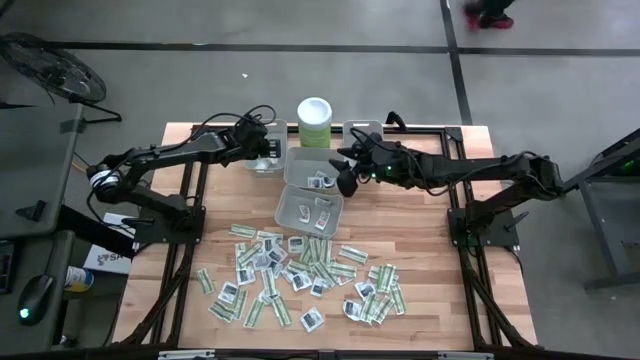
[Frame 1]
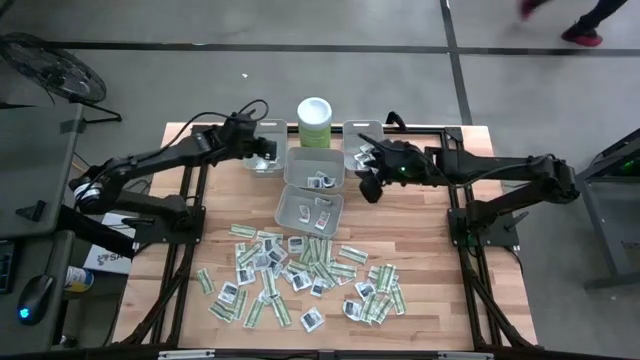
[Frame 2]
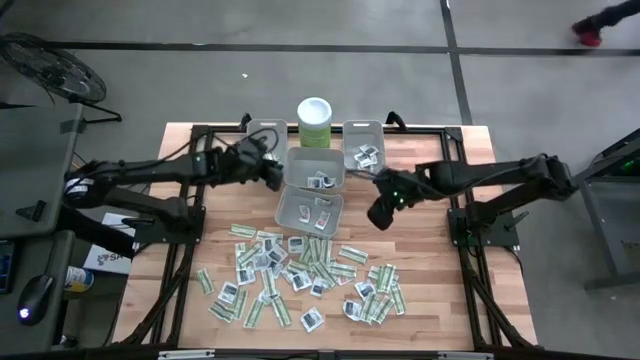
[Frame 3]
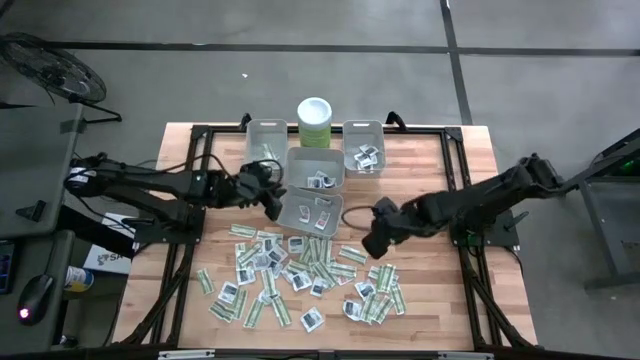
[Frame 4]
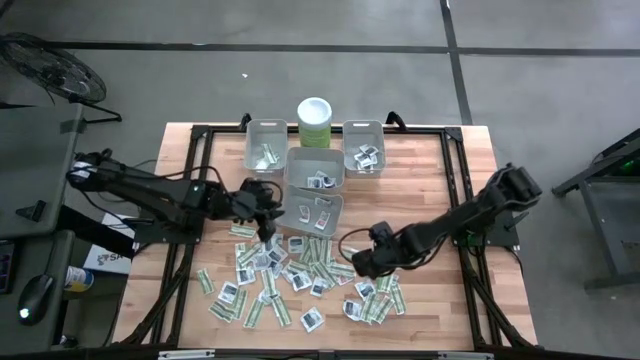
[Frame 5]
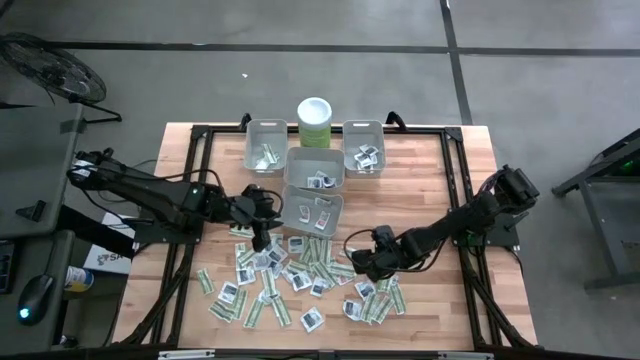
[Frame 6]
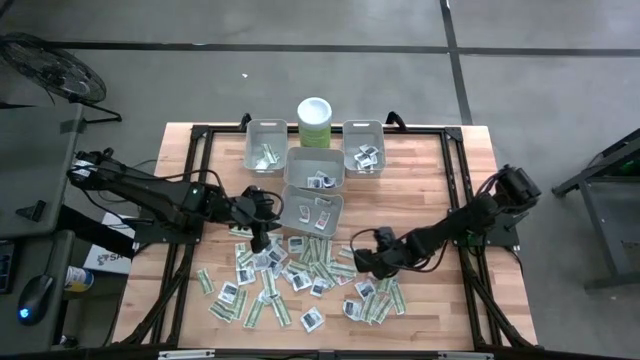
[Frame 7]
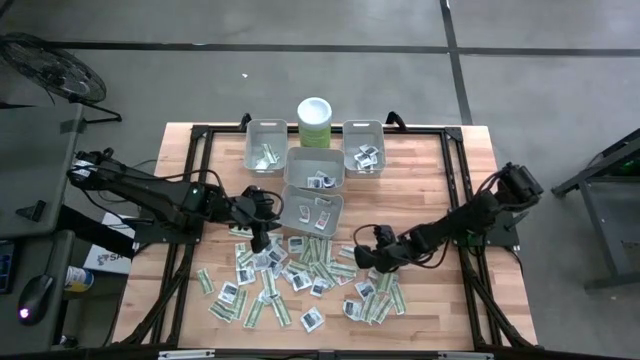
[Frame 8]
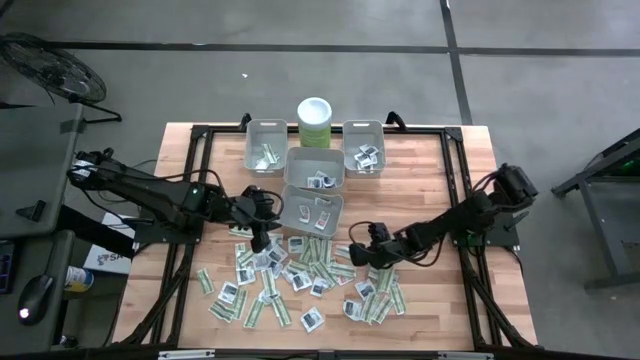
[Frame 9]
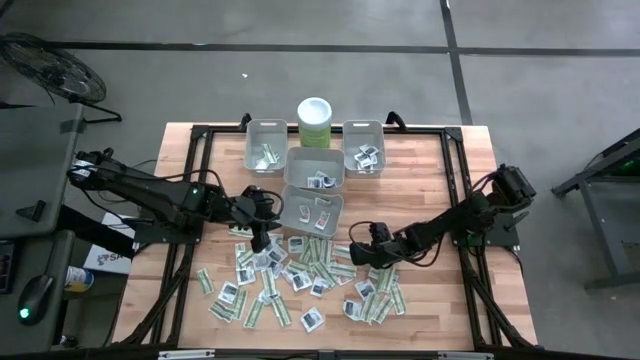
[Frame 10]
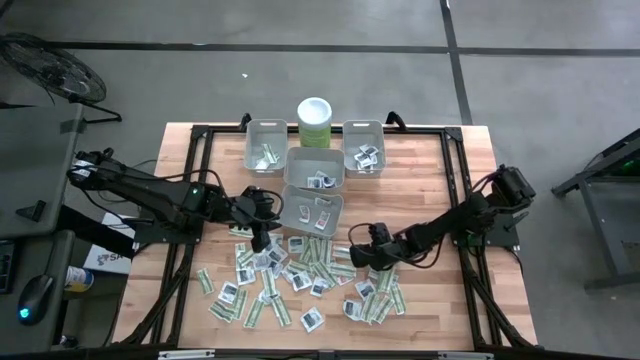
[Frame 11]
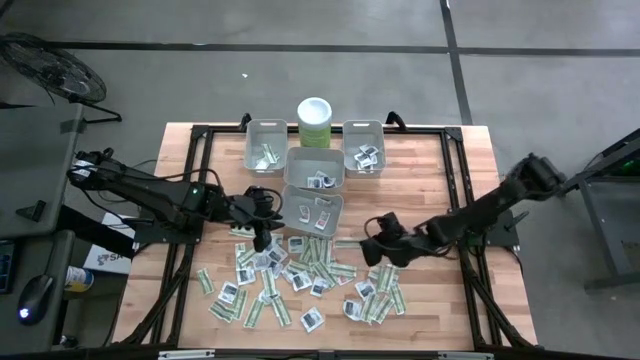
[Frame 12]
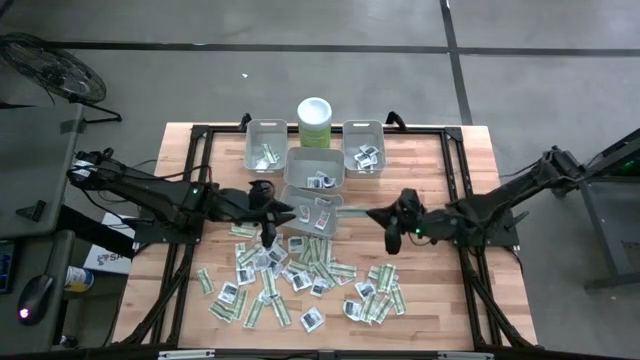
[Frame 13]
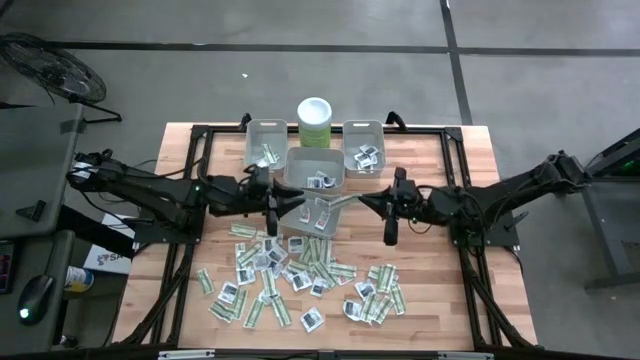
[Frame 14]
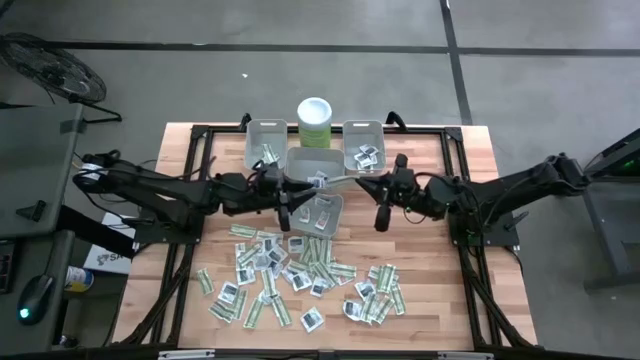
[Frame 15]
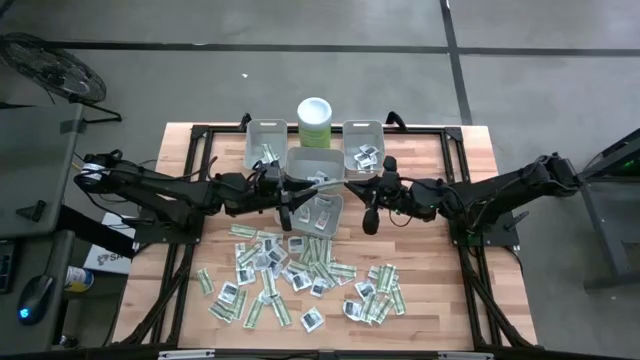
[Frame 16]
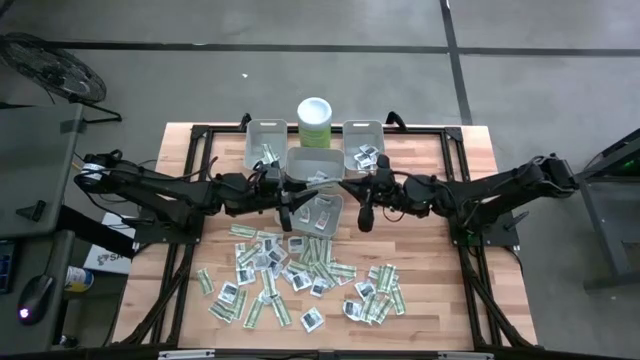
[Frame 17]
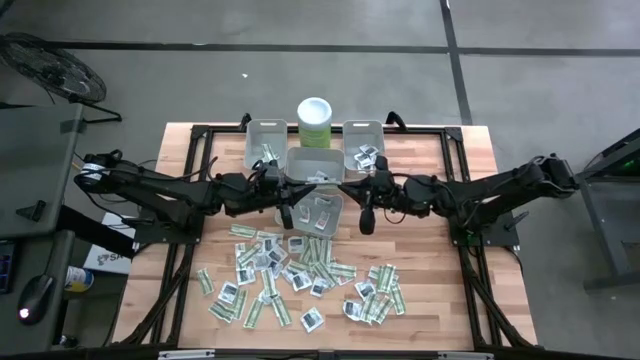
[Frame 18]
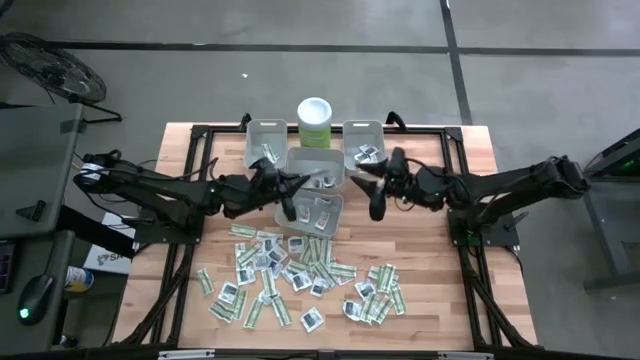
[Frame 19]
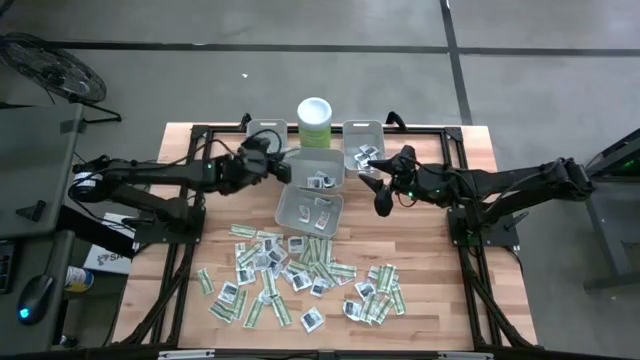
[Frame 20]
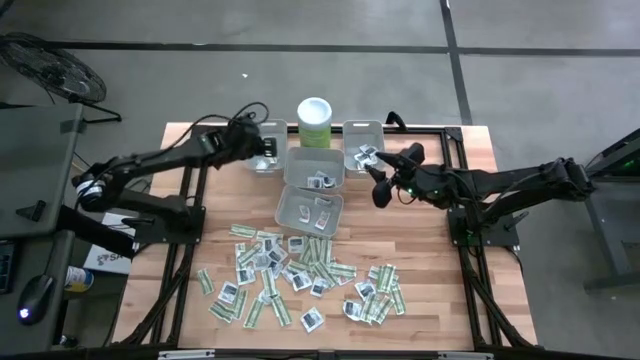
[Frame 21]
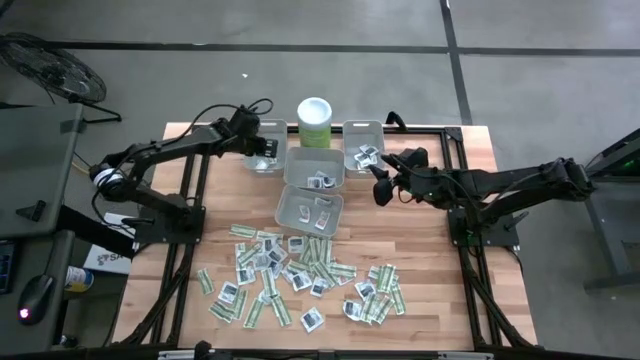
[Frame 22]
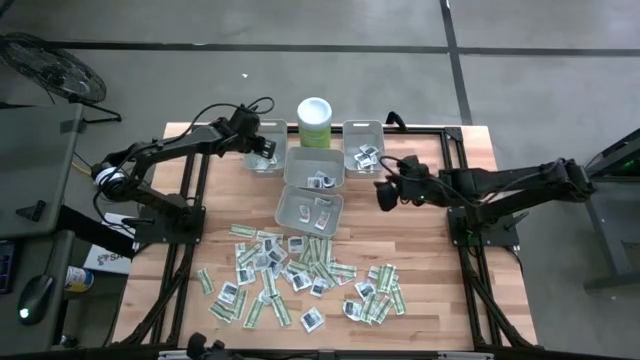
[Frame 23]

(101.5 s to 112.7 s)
Task: Pick & Place First Aid Supplies
Put the bandage pack into the left bin

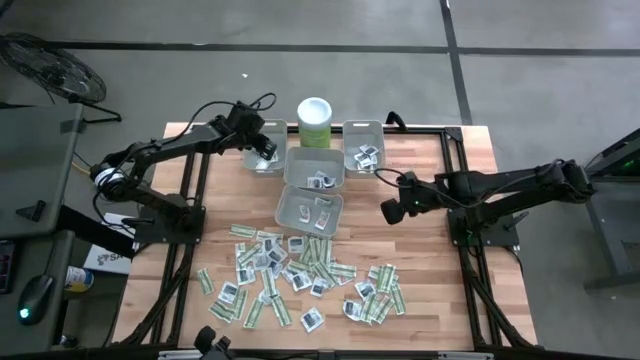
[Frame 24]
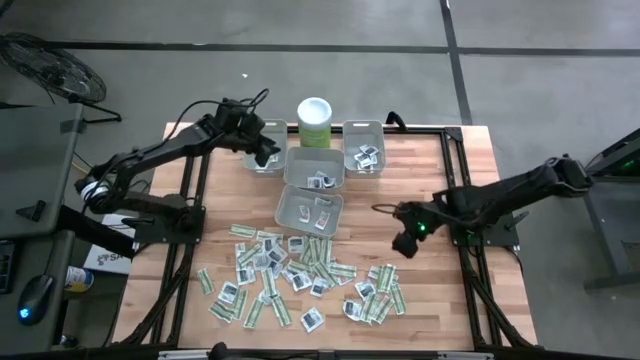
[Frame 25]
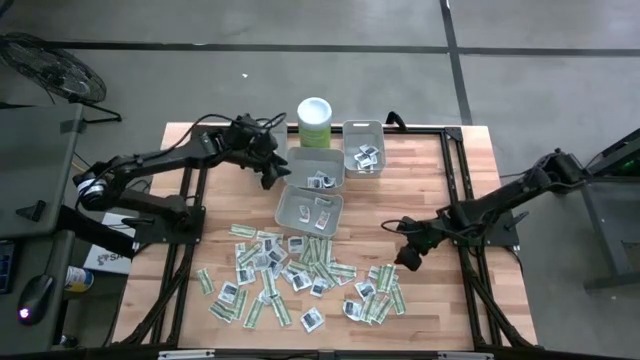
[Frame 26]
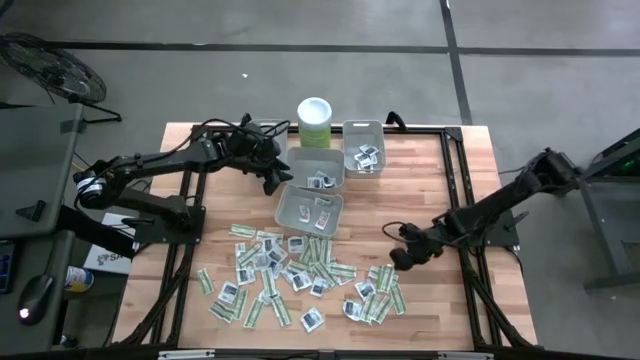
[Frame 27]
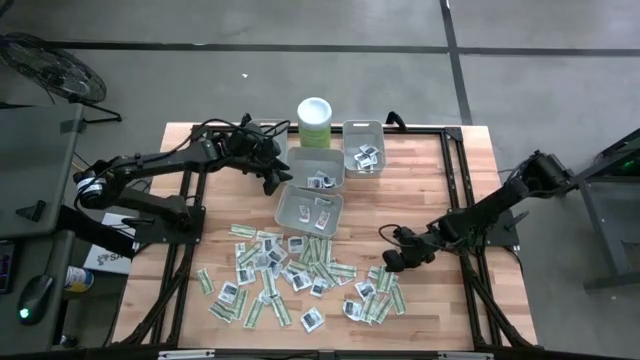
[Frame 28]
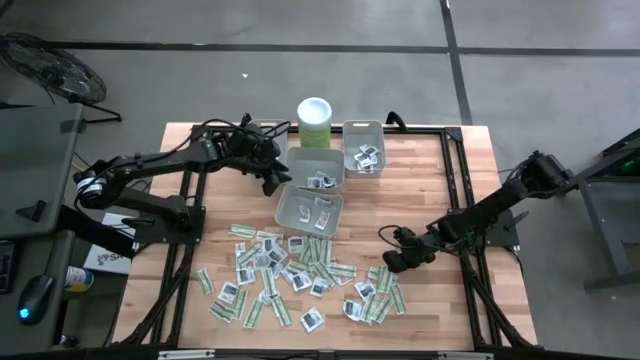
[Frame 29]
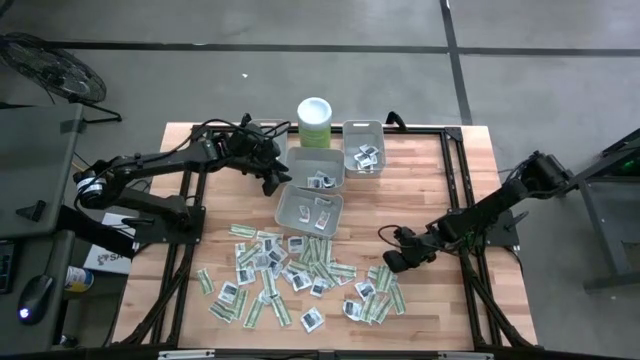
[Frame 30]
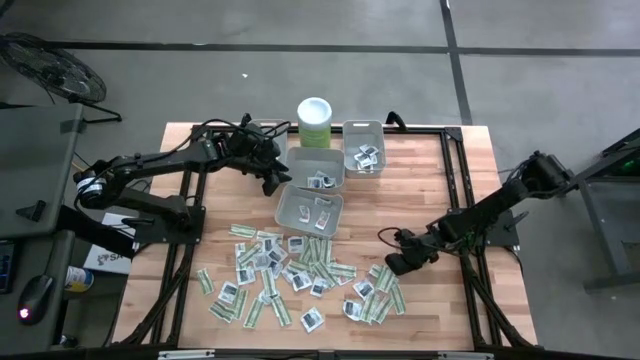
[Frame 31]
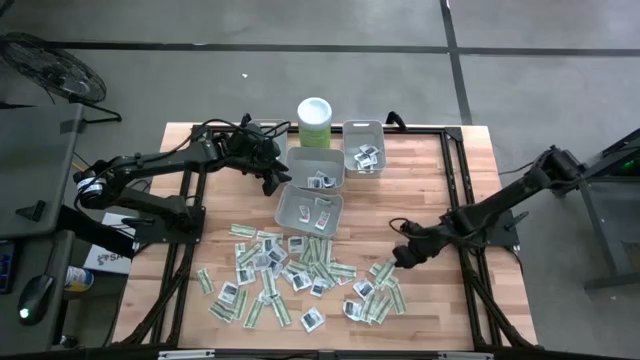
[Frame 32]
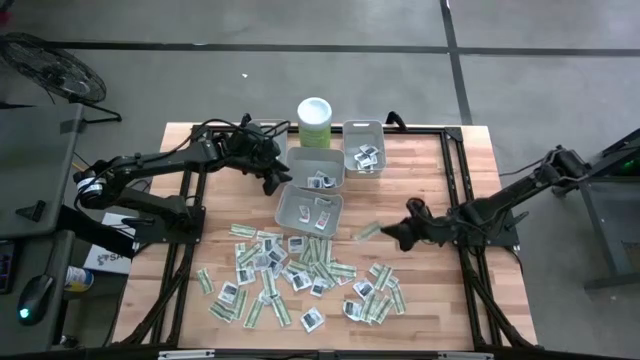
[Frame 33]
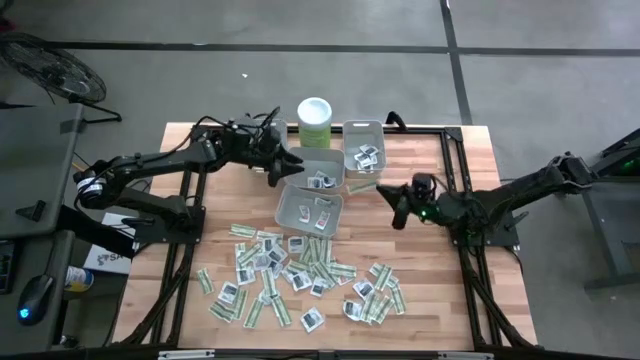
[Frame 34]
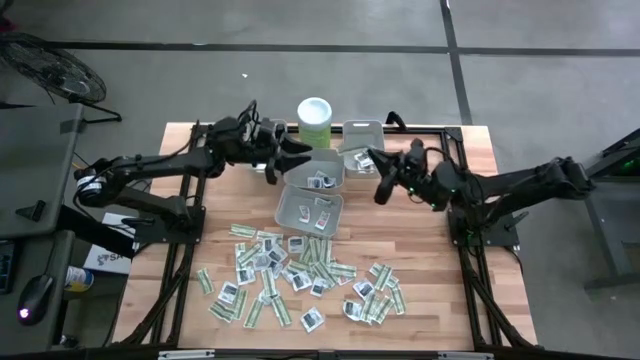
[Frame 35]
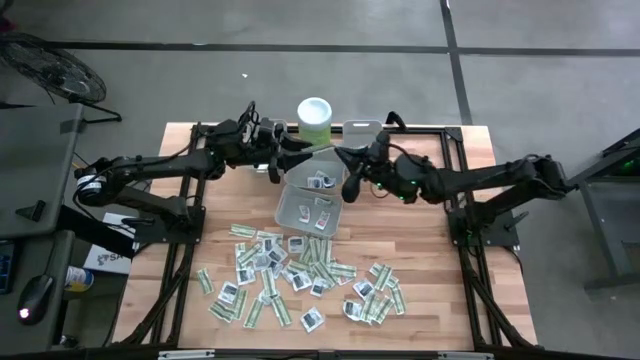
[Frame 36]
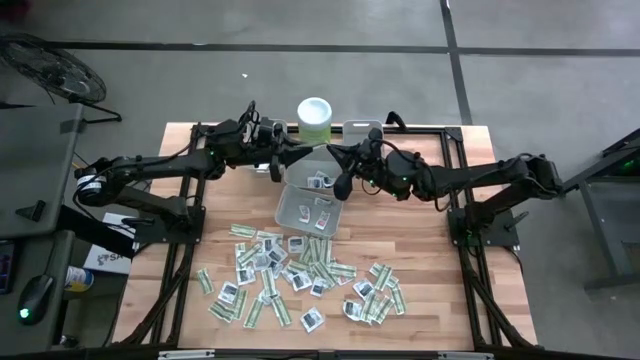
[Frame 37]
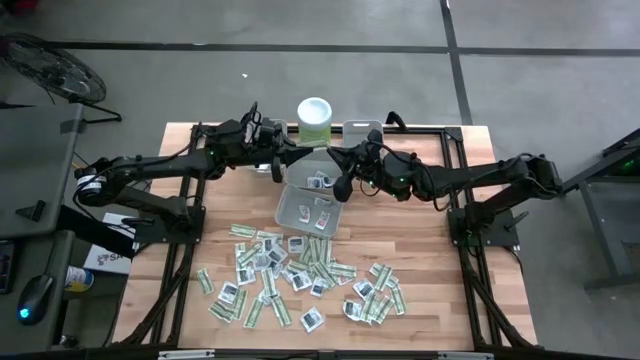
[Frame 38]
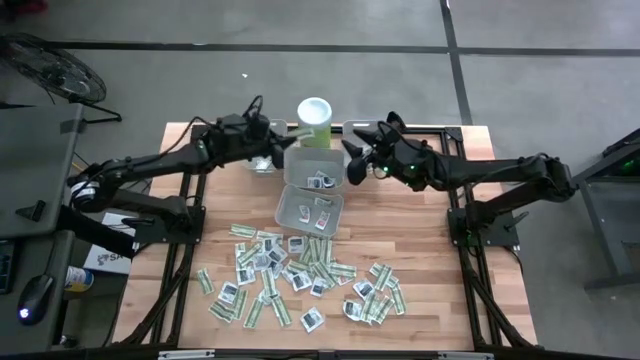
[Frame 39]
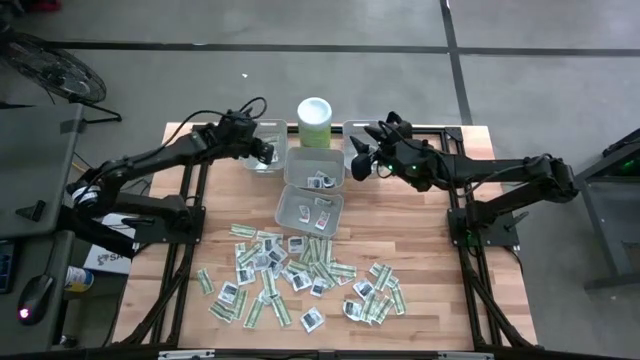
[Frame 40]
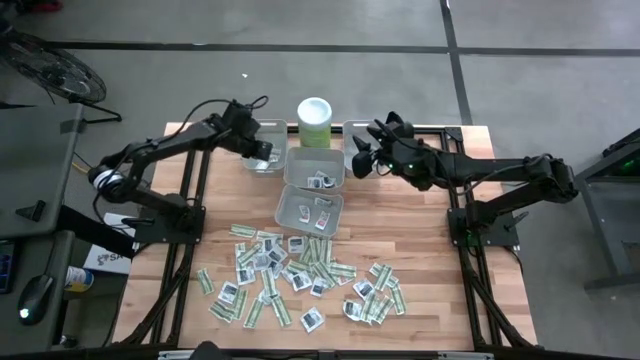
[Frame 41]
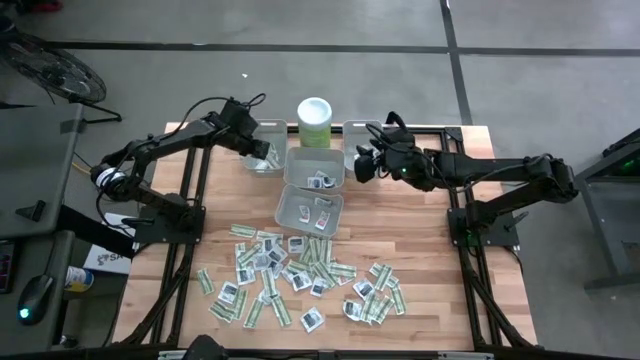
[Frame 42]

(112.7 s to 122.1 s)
Put the bandage pack into the left bin
